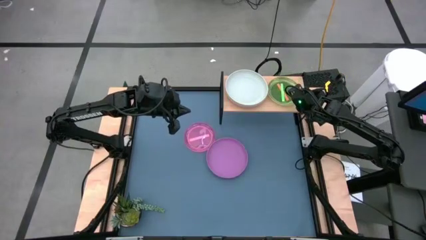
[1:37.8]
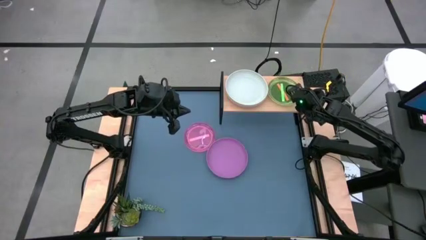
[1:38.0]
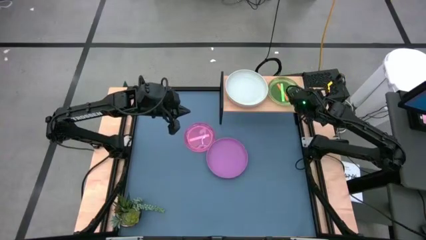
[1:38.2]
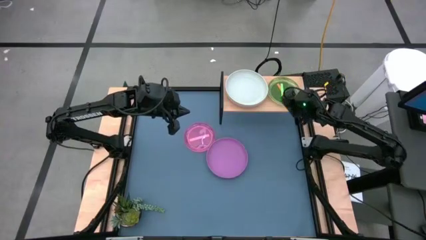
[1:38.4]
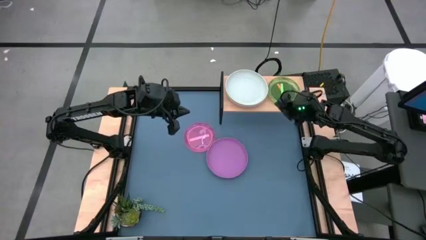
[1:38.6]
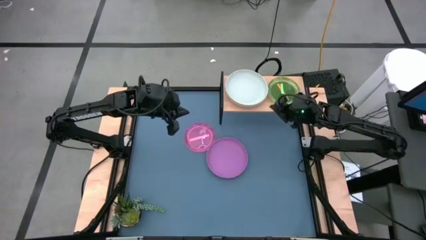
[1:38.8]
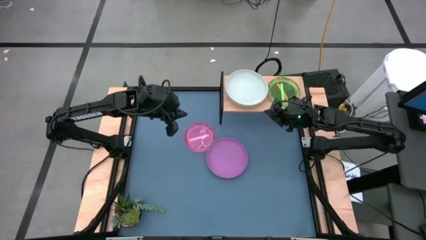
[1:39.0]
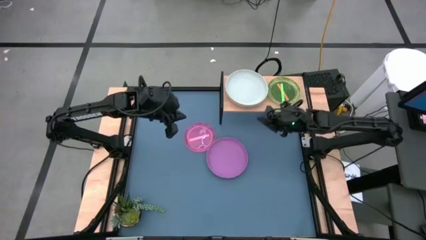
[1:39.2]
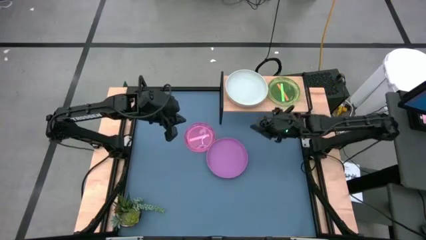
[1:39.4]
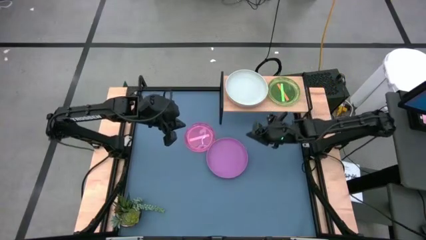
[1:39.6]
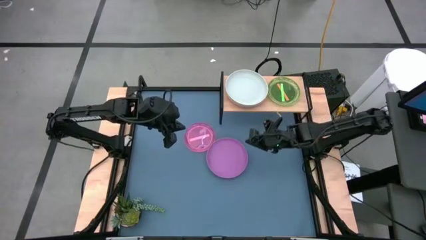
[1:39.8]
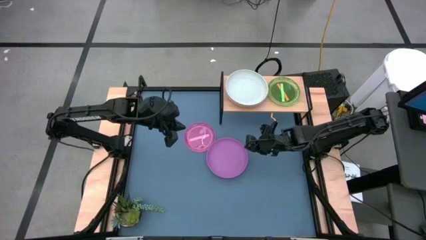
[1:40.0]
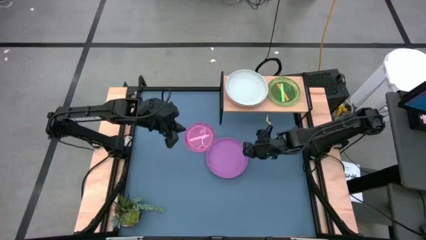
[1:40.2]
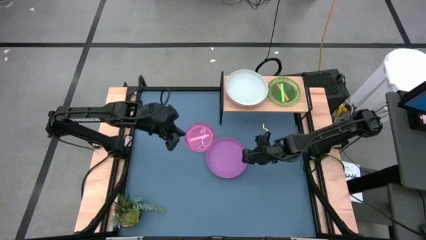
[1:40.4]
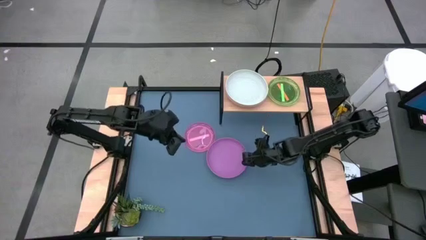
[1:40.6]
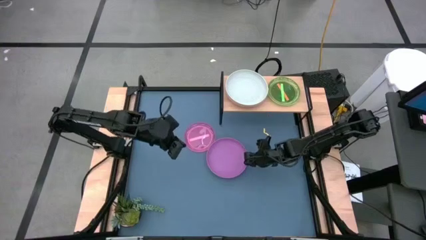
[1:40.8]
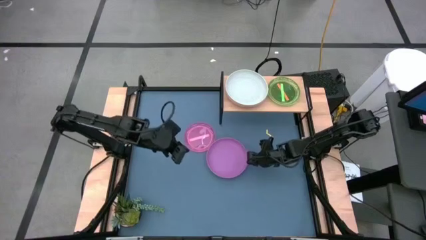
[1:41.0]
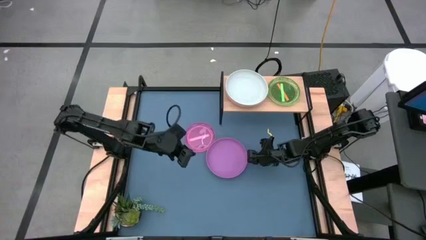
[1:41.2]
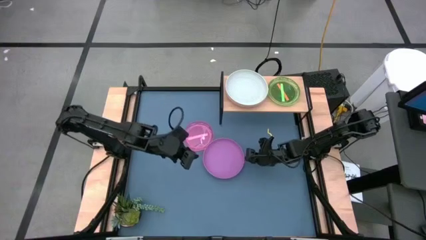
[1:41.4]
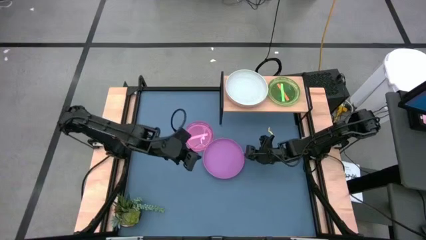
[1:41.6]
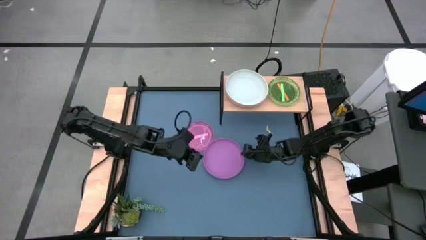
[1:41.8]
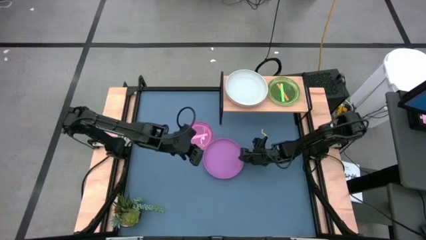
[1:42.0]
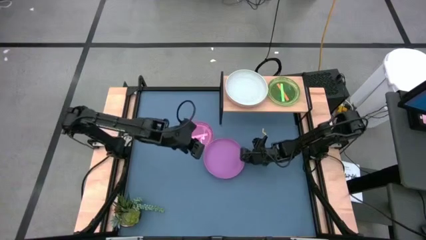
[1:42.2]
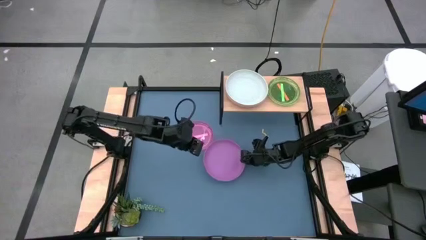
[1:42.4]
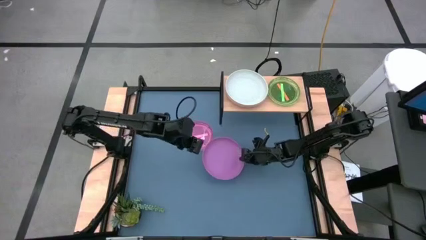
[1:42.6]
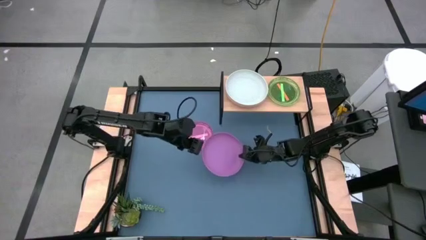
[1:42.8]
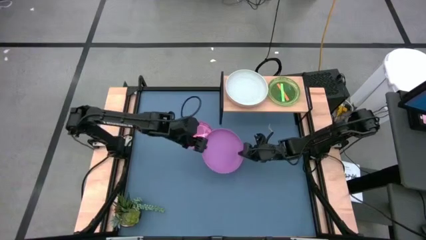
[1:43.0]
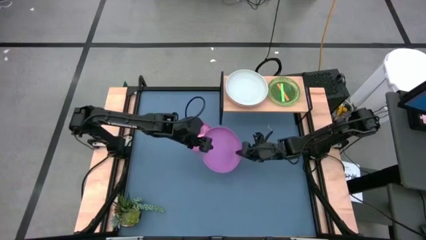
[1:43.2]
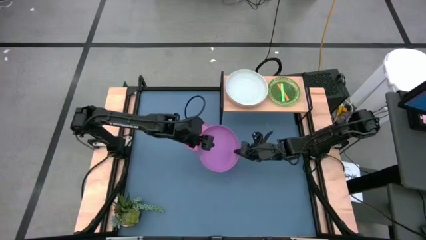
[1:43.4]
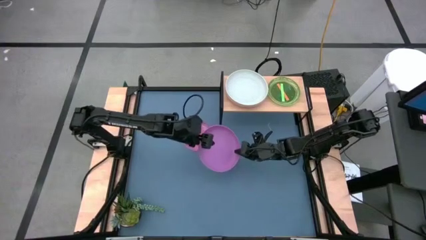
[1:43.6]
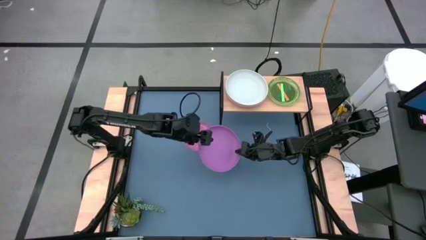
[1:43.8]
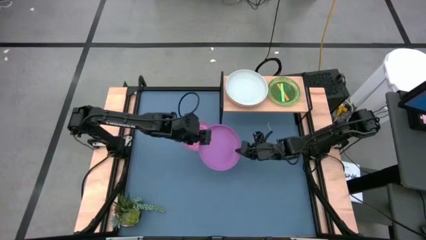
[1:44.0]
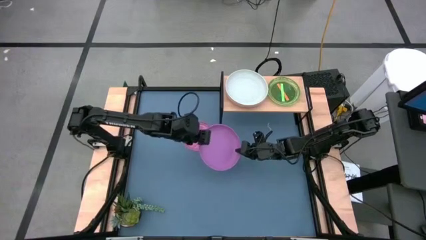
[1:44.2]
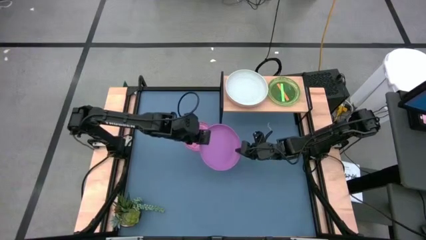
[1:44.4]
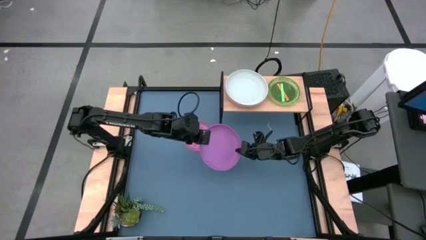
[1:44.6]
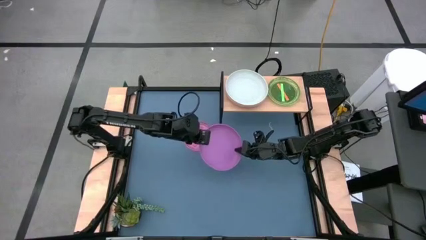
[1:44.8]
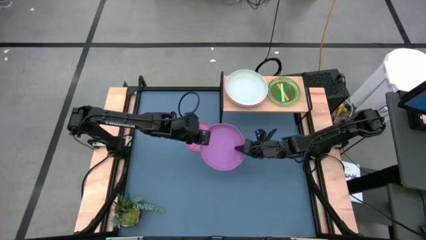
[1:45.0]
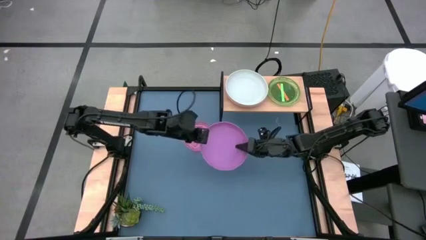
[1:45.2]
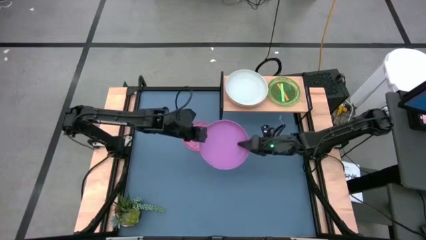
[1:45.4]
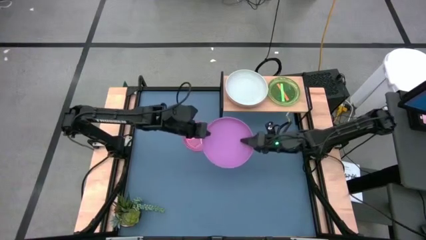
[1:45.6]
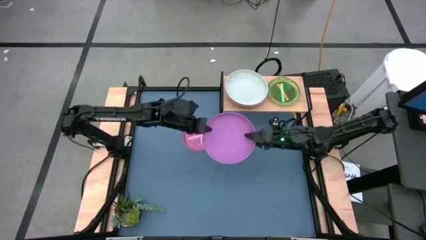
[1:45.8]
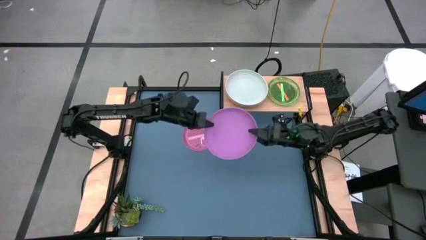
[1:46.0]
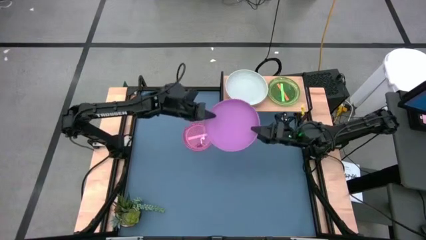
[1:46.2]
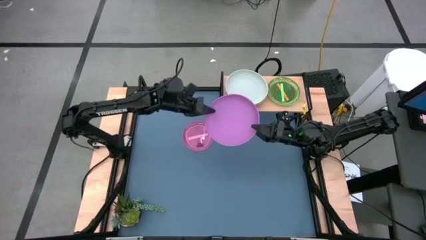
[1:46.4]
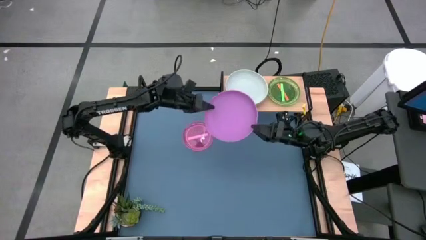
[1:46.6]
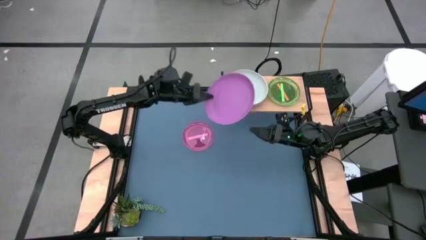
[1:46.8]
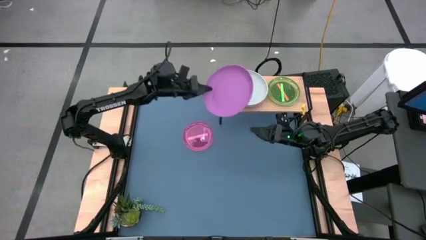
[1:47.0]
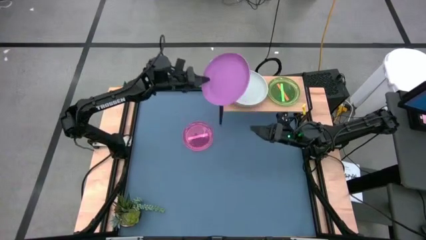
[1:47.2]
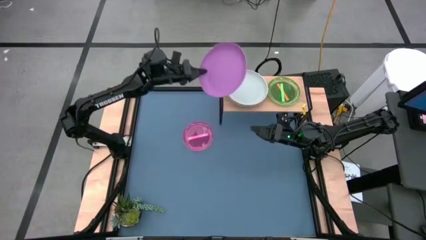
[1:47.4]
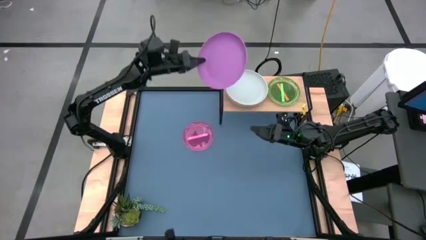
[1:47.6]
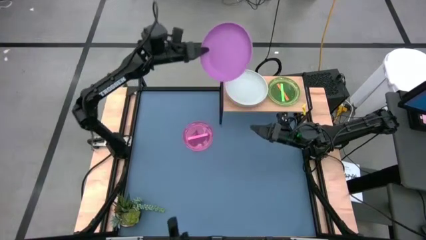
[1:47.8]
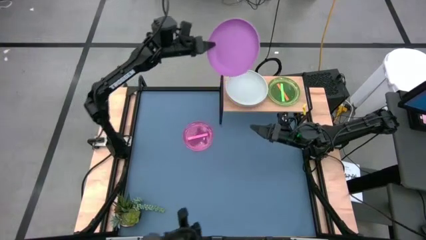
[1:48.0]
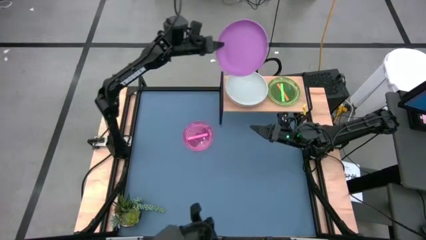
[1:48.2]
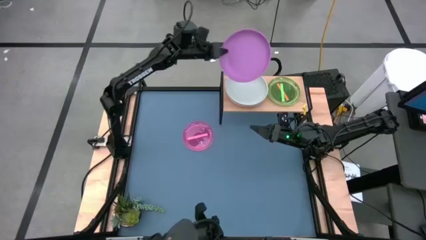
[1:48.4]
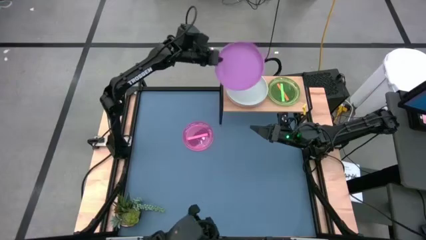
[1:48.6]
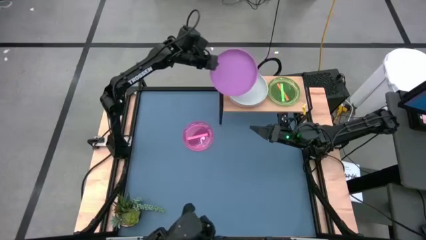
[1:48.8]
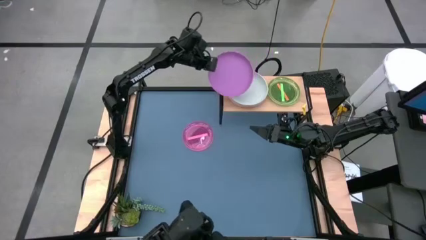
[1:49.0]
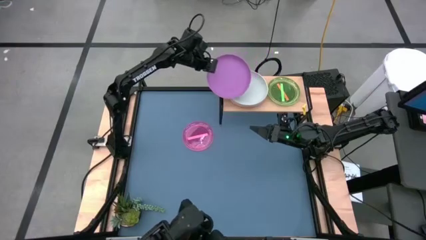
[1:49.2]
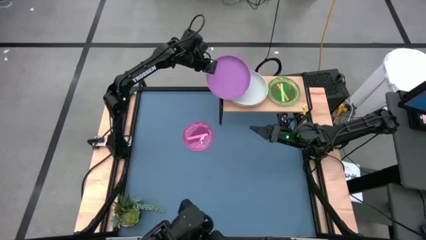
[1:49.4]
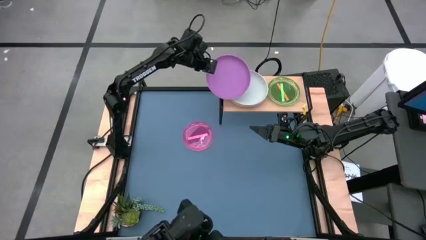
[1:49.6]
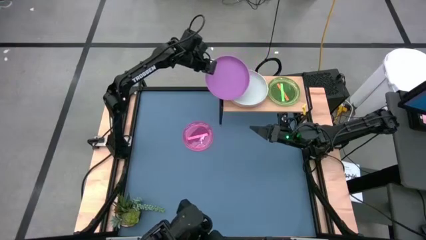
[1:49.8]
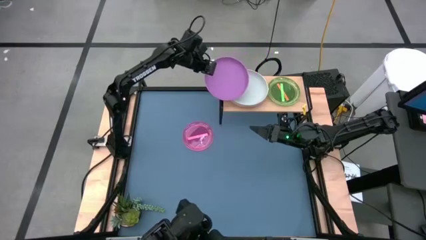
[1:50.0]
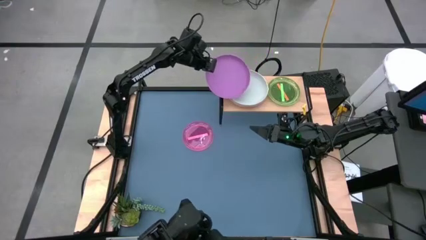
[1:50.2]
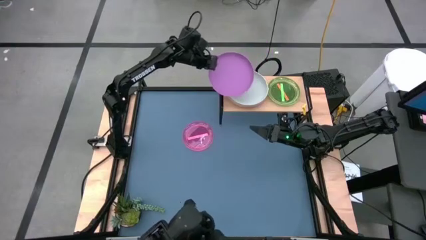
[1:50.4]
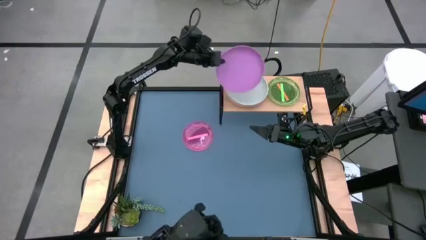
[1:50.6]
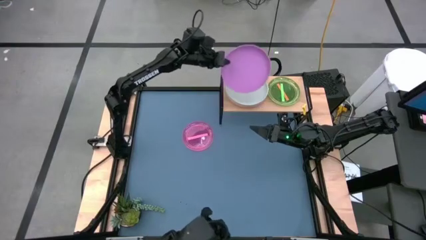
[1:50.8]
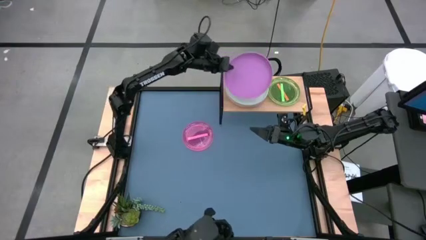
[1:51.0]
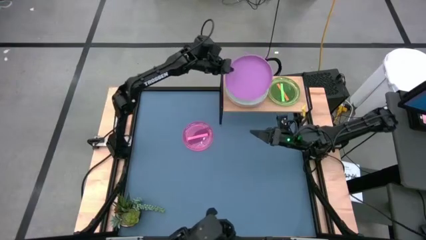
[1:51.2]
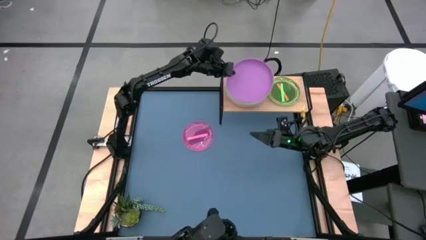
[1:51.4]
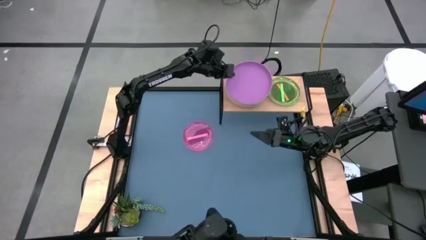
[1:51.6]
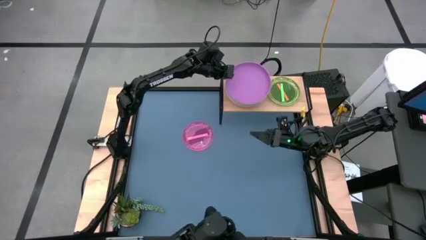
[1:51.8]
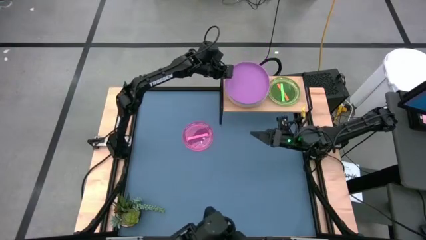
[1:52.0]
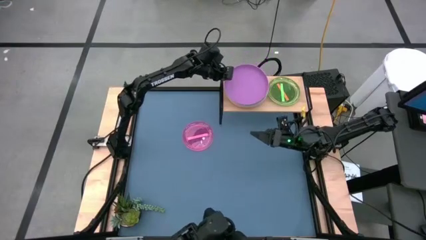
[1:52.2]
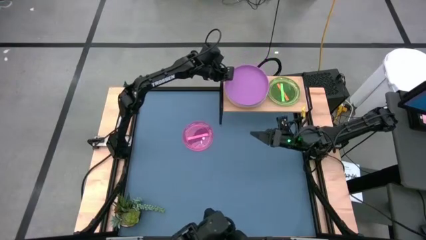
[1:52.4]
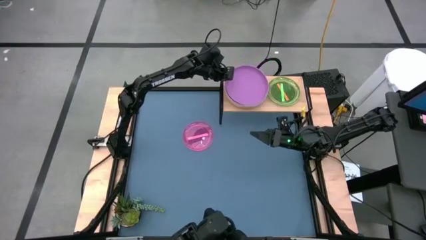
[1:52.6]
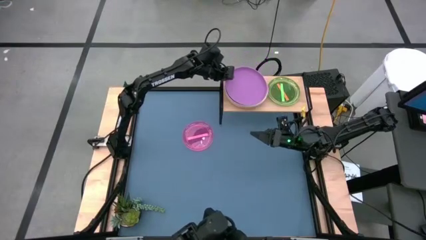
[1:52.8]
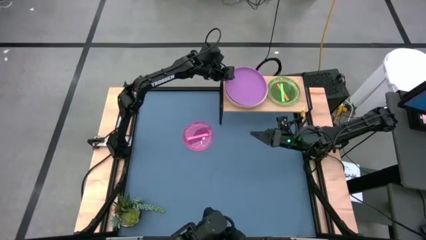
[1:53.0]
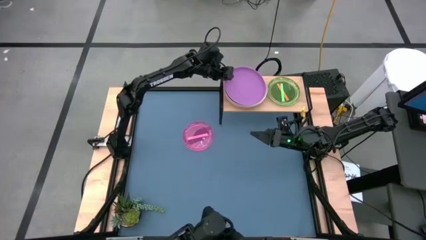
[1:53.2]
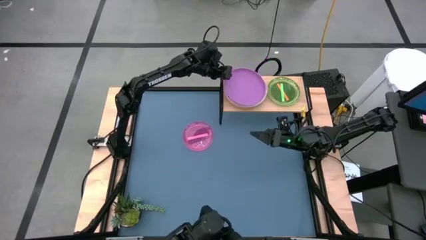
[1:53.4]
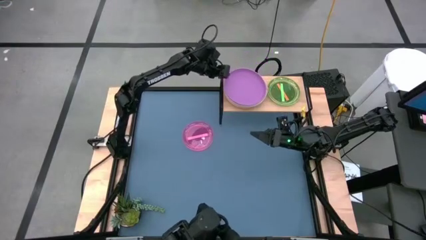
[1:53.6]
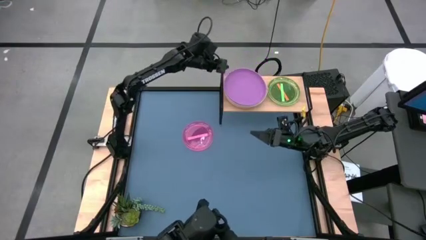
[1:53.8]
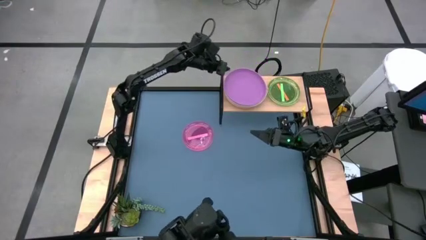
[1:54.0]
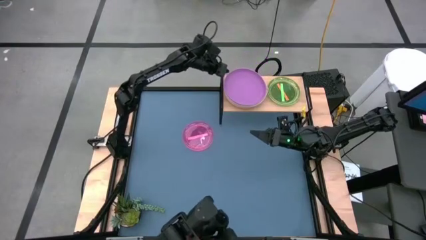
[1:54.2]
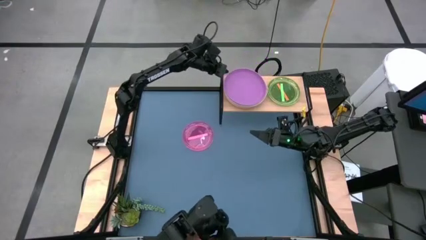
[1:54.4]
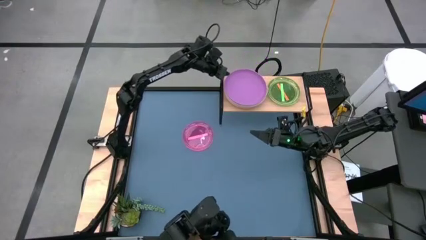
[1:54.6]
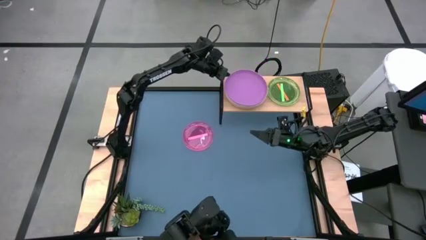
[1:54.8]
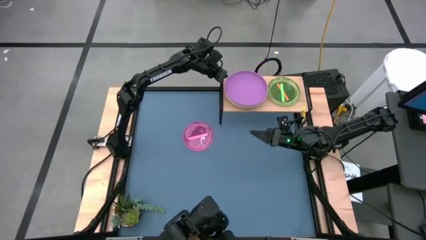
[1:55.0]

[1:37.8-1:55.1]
Task: Place and stack plates onto a shelf
Stack the large purple plate on the large white plate on the shelf
